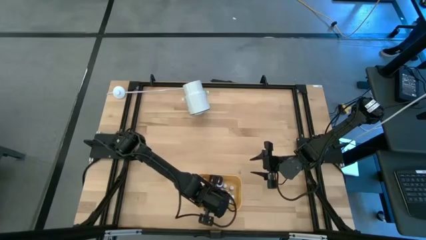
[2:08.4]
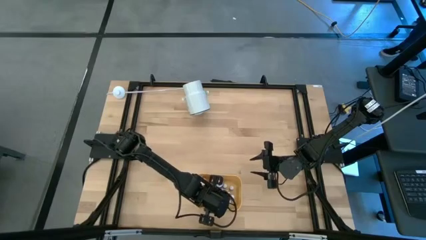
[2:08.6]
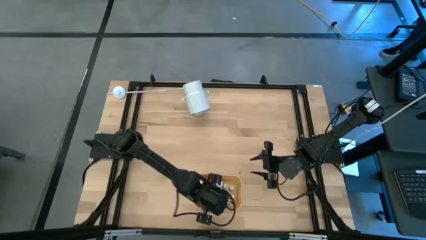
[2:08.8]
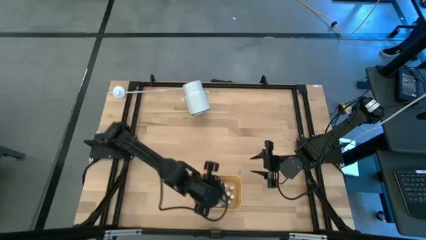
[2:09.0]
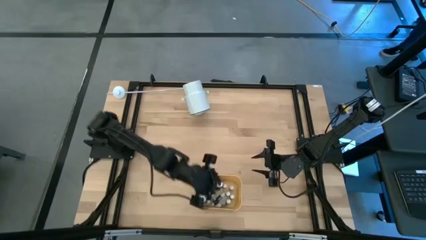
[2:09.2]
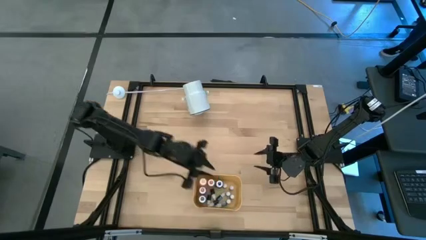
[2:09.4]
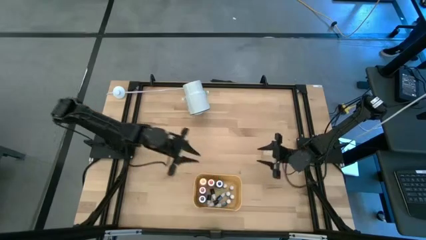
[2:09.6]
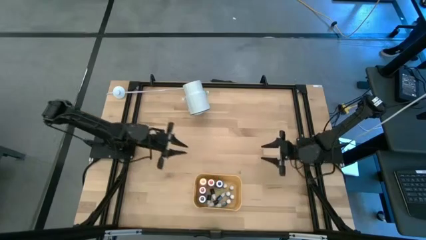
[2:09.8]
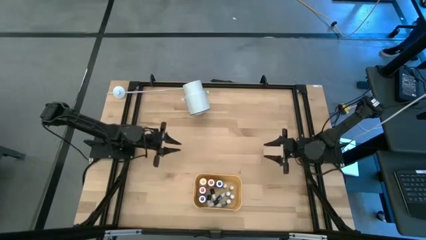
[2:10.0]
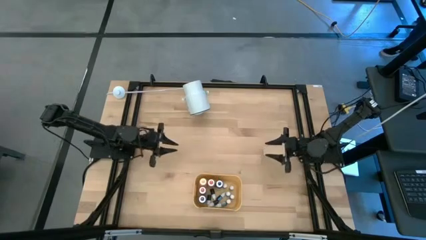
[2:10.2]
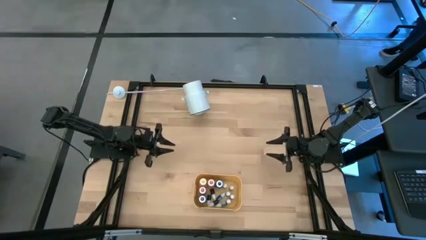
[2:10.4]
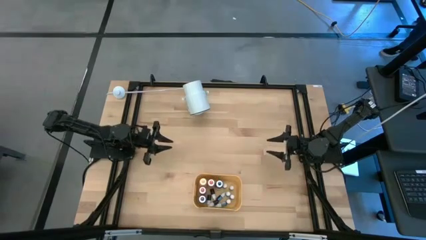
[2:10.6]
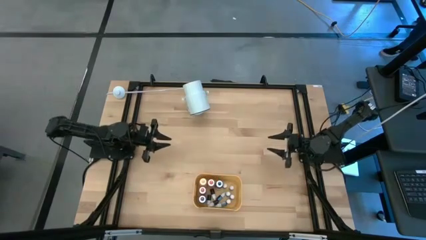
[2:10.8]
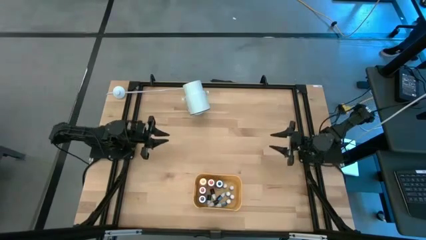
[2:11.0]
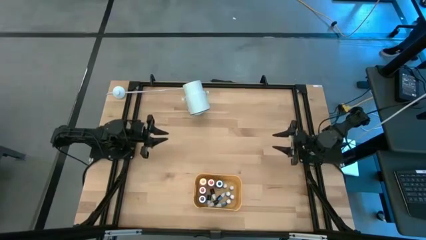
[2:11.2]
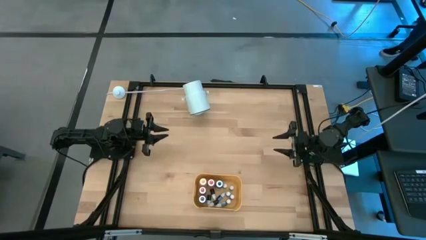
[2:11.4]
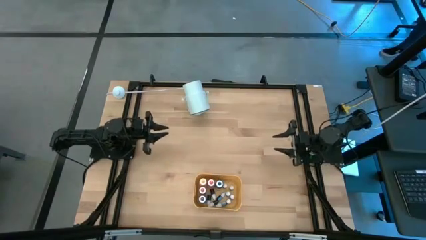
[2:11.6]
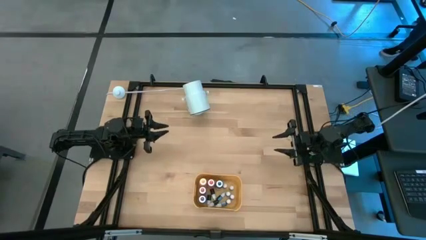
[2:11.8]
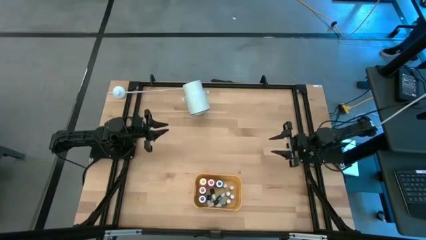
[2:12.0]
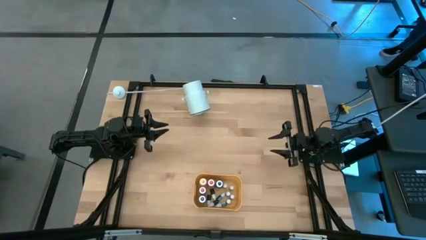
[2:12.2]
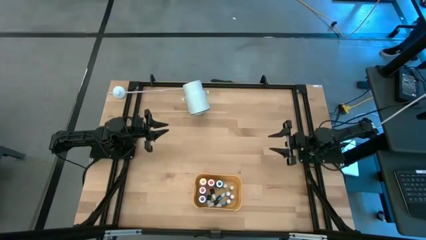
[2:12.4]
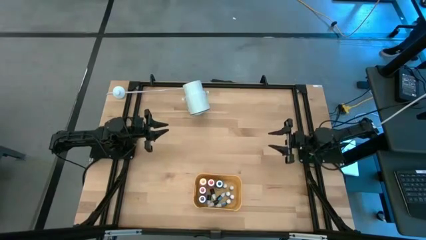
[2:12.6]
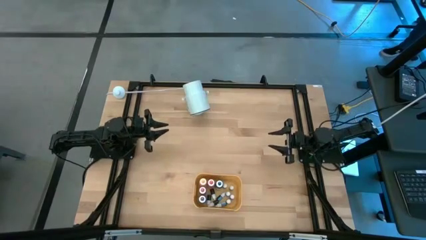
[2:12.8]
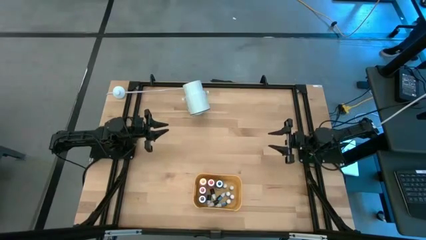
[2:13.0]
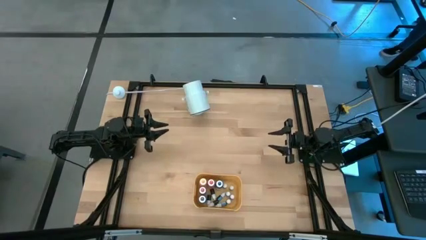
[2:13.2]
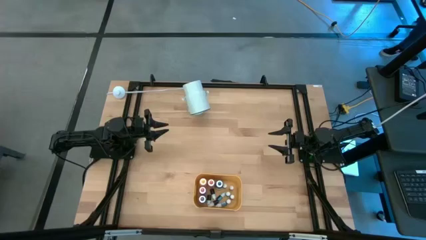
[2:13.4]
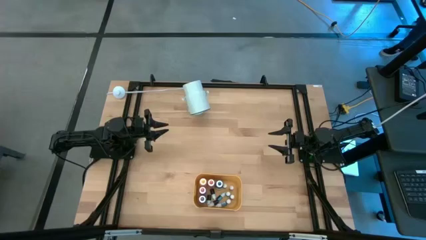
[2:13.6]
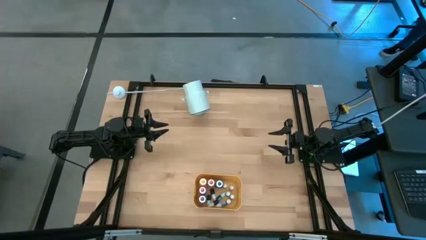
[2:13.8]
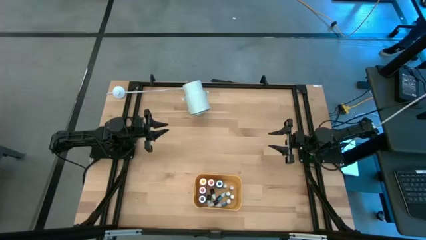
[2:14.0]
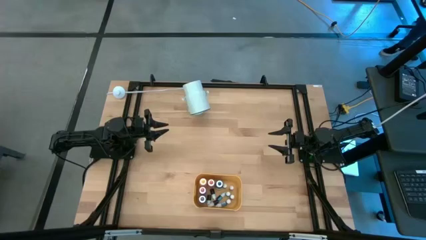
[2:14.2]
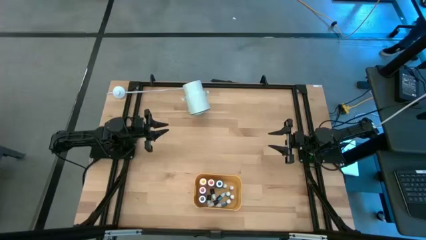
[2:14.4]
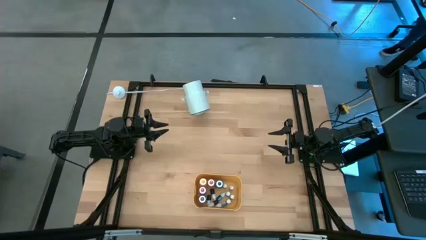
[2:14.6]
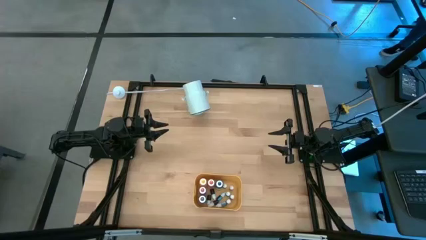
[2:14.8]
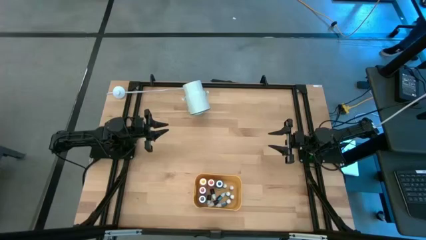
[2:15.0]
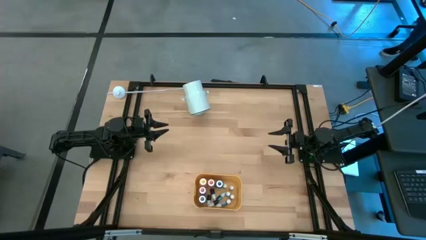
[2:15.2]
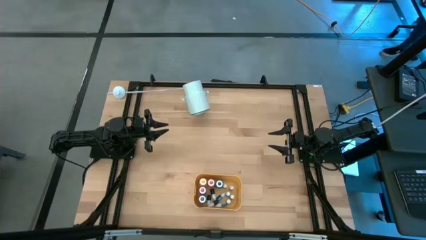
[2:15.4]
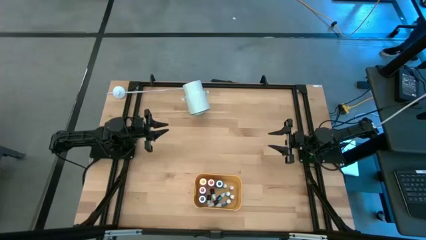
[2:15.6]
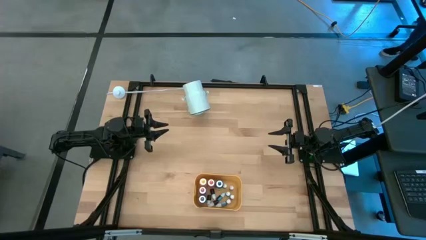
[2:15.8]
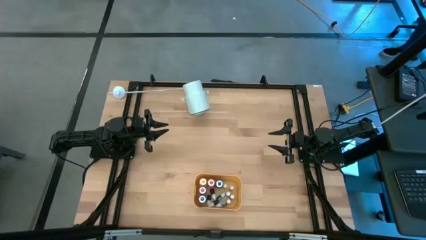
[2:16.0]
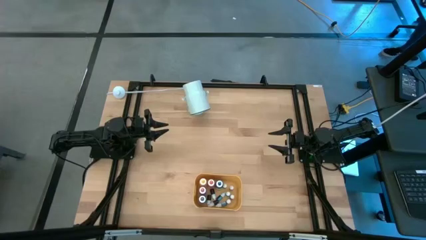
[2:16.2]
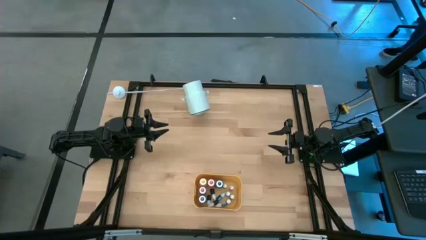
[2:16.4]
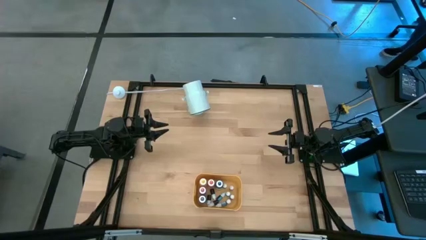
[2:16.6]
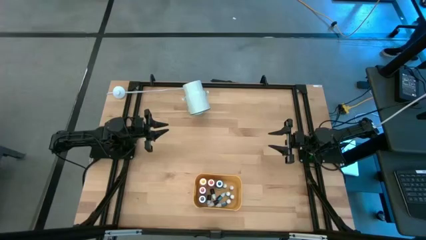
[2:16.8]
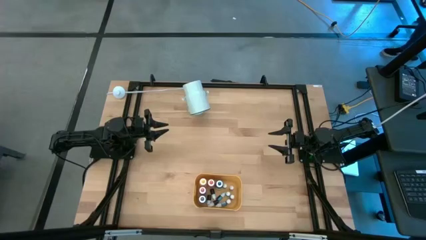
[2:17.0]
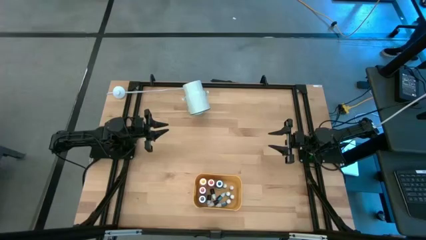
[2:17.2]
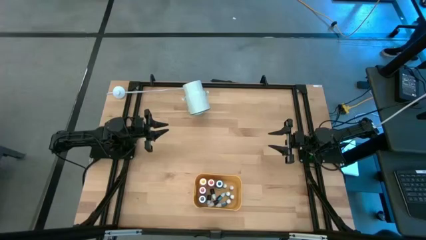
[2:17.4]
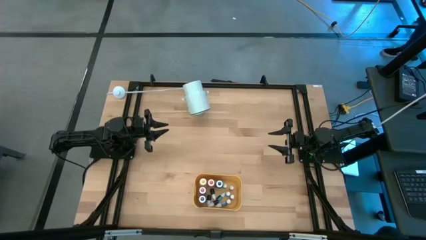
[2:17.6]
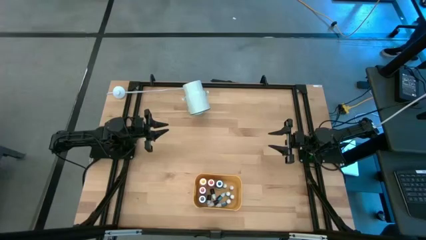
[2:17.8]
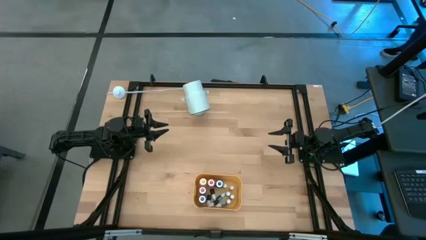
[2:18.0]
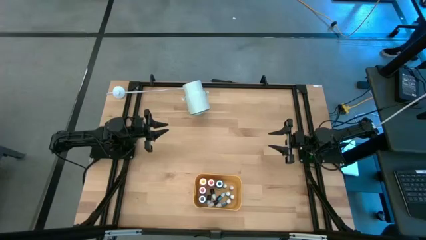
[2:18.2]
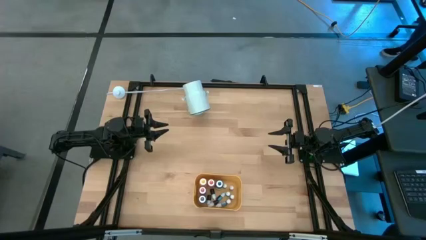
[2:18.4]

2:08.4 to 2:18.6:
Task: Pick & Place food coloring
Return to Home Position

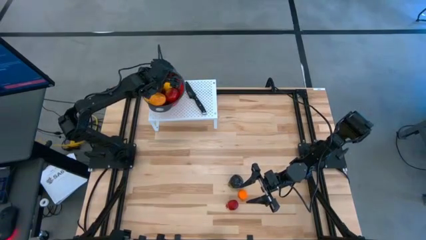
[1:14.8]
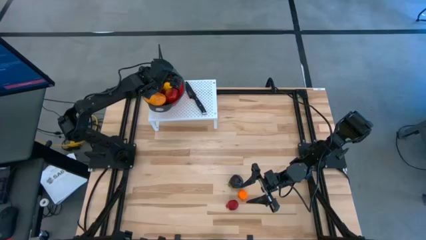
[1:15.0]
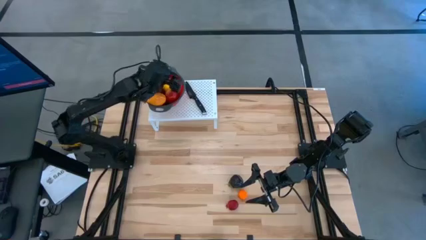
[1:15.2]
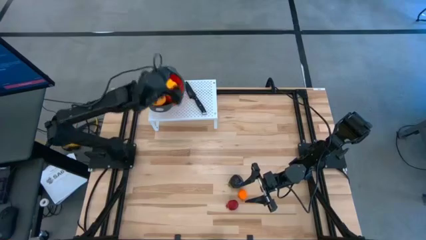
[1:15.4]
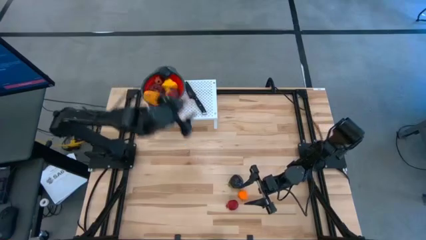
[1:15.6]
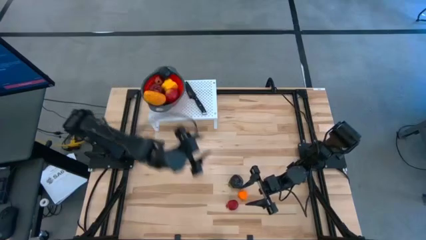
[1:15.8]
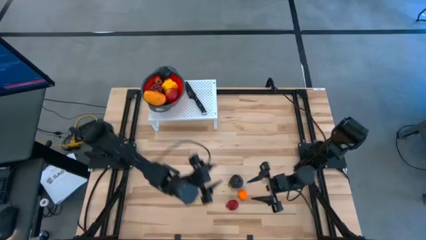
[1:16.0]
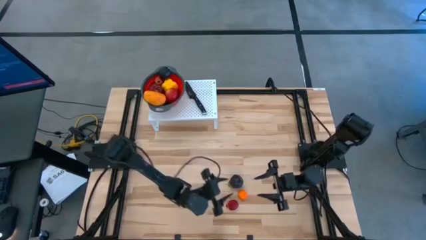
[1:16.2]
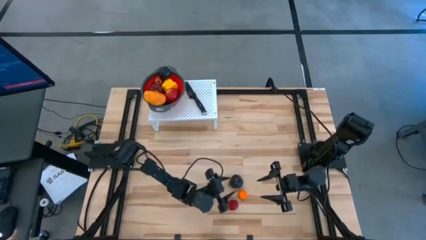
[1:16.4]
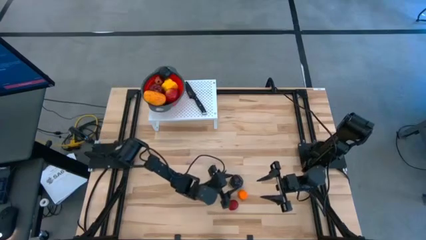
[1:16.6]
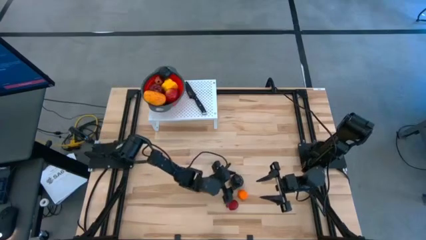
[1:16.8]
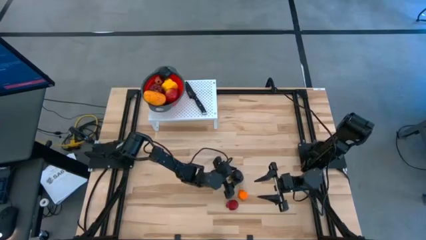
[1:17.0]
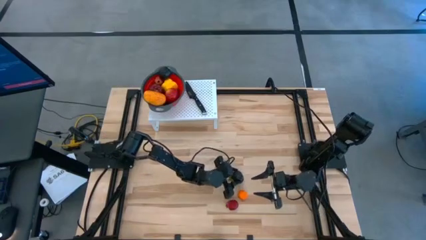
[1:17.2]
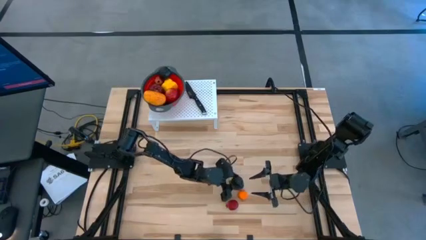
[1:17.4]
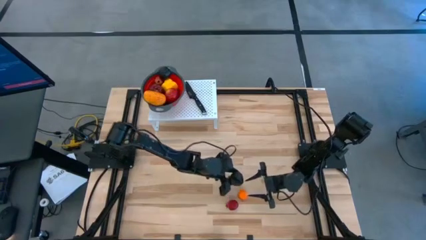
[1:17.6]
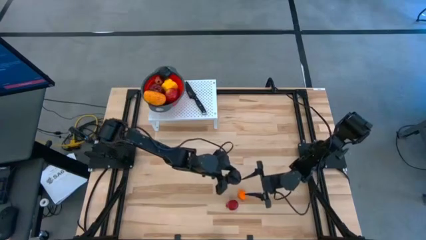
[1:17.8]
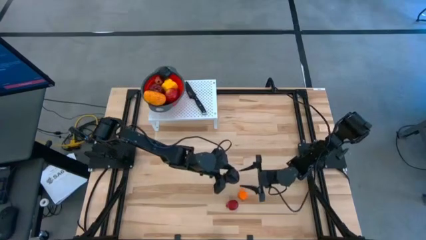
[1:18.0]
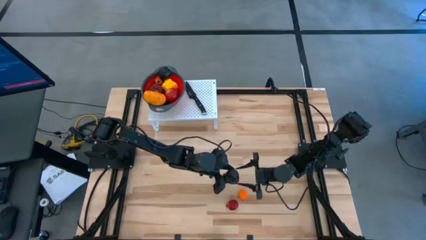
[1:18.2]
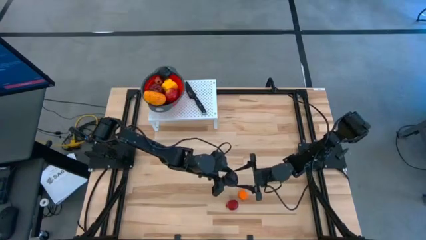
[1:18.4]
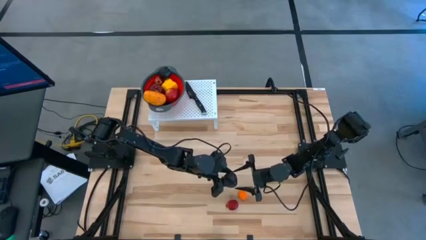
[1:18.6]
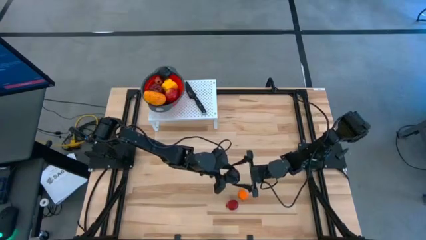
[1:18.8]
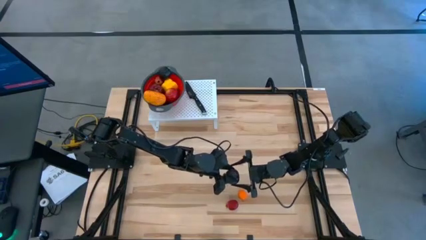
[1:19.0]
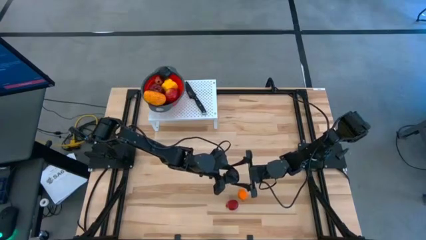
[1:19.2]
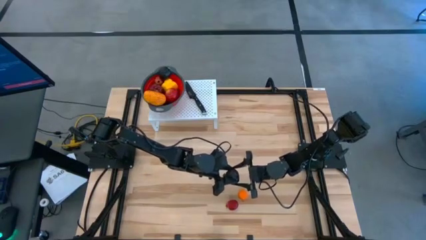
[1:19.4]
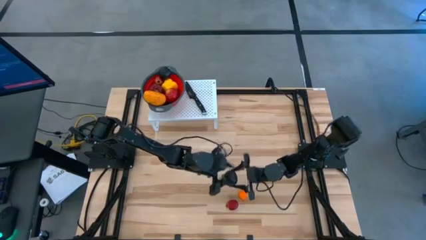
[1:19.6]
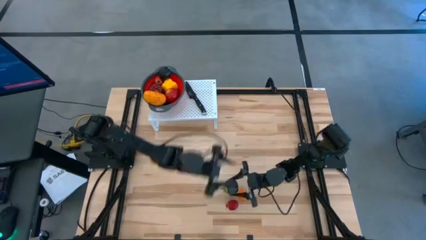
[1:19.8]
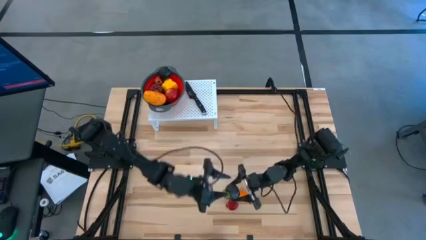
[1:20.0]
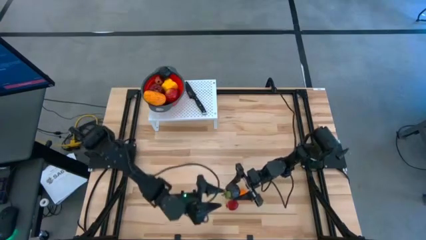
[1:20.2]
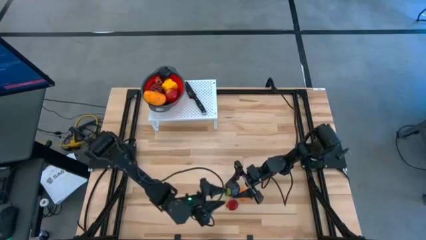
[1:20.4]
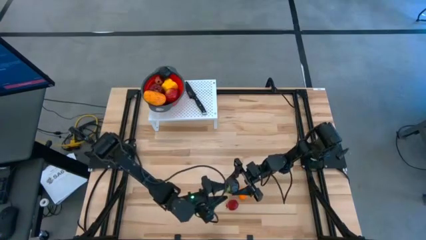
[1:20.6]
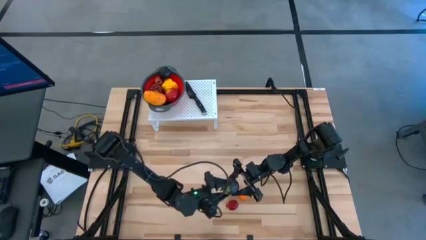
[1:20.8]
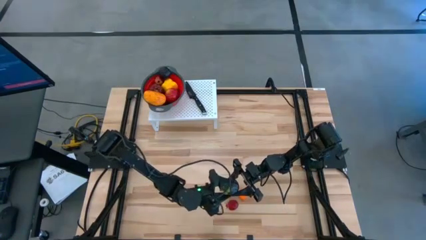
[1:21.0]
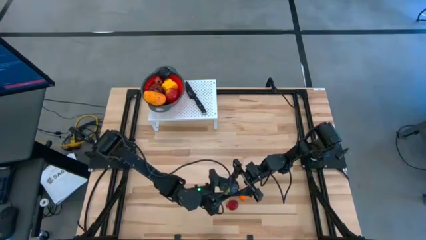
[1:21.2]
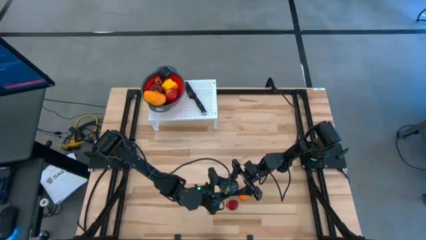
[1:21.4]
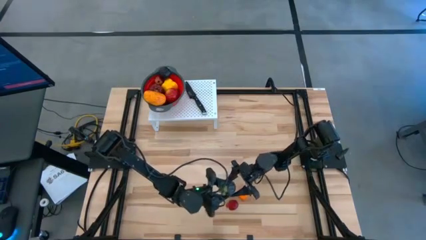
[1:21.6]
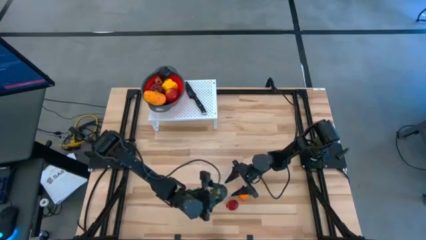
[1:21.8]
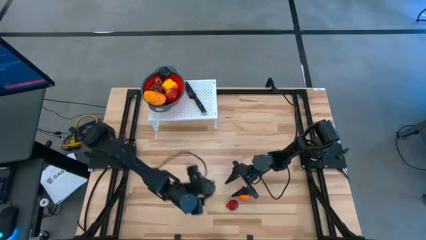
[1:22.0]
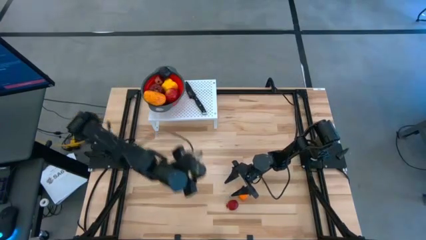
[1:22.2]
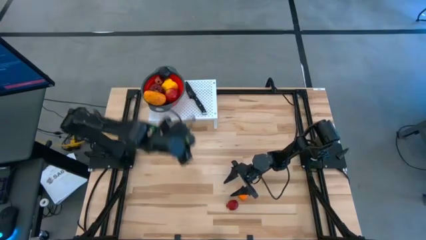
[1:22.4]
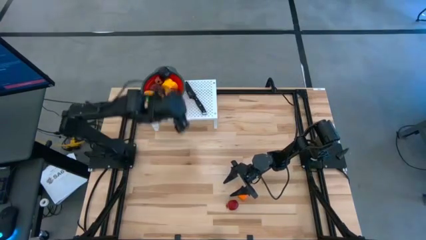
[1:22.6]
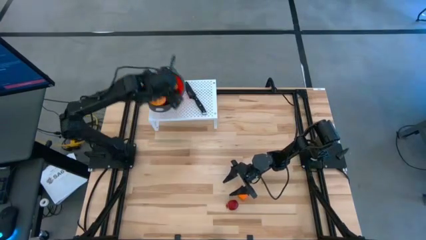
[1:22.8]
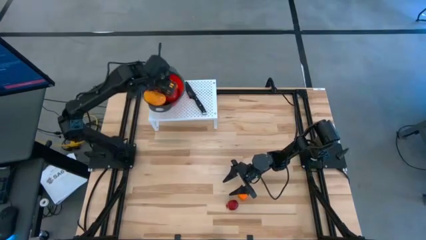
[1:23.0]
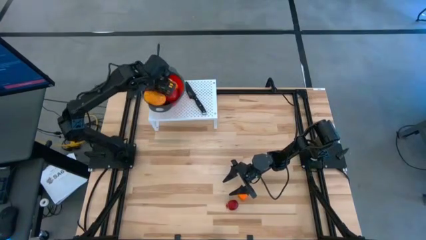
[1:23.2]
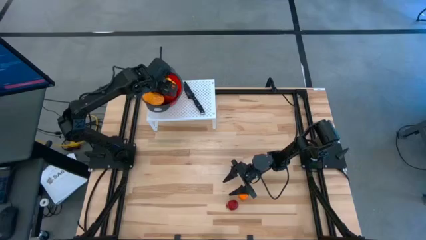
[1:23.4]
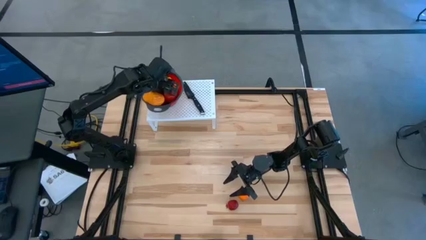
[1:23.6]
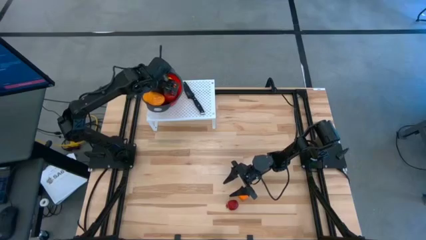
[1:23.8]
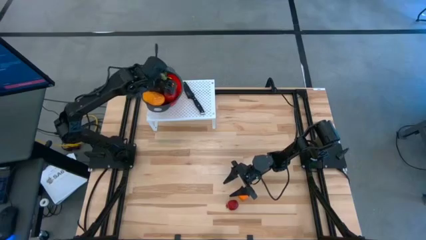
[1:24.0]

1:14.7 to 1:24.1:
Task: Pick & Place Fruit
Put the purple mangosteen into the red strainer bowl on the shelf
